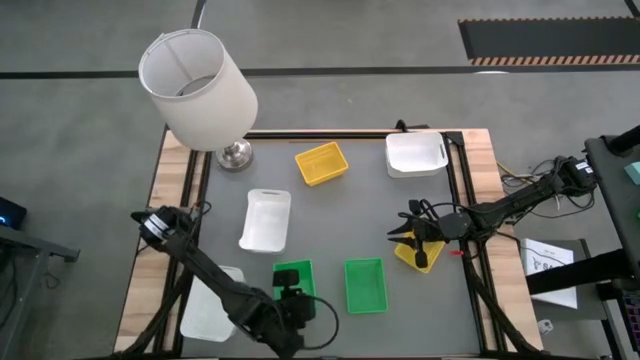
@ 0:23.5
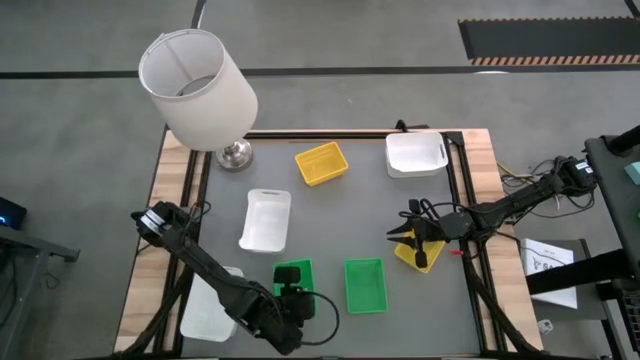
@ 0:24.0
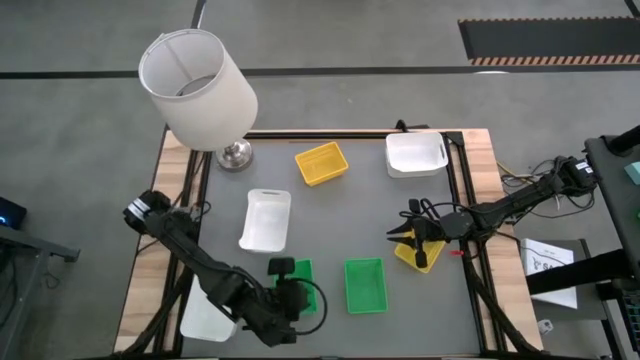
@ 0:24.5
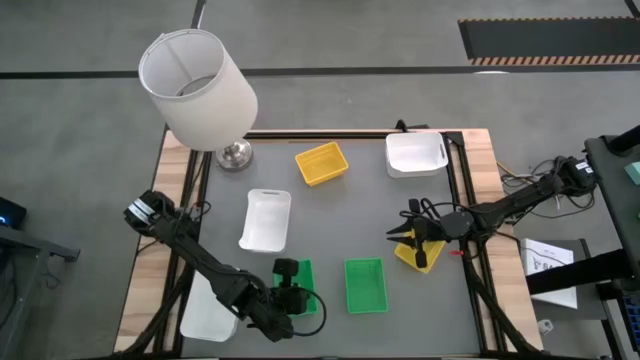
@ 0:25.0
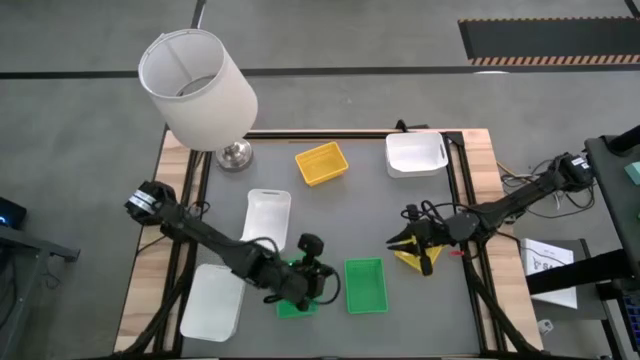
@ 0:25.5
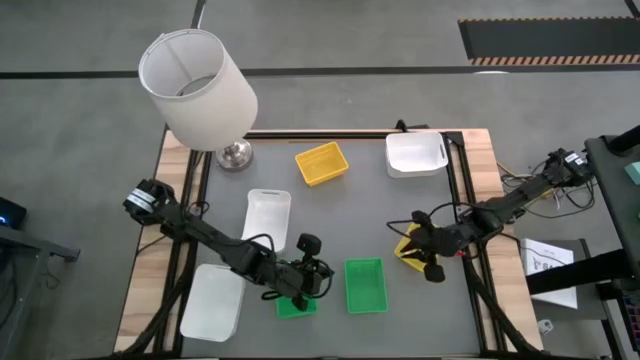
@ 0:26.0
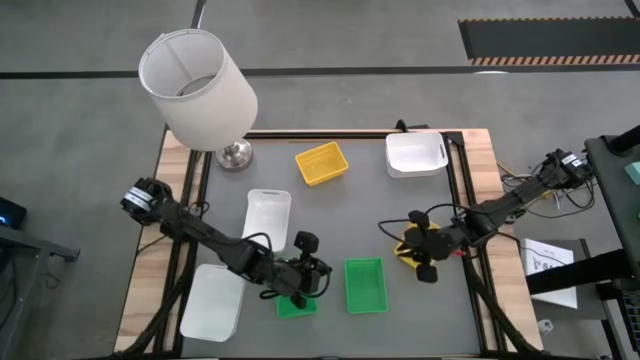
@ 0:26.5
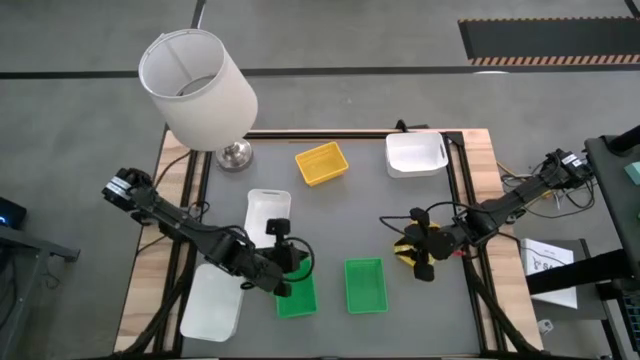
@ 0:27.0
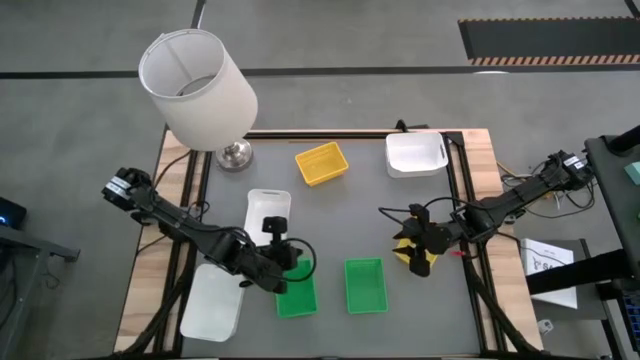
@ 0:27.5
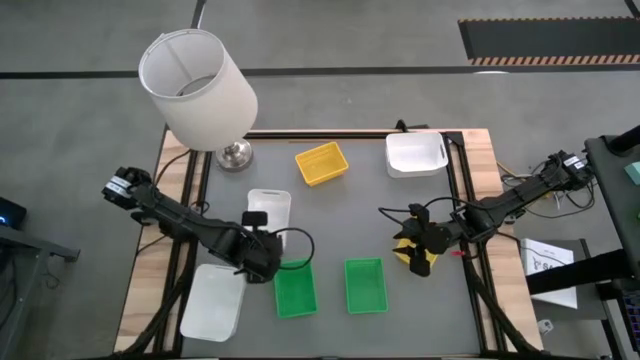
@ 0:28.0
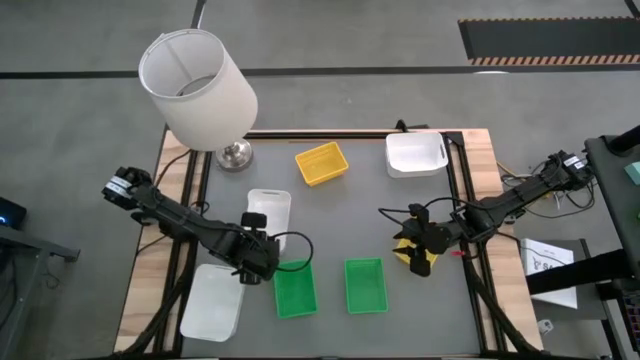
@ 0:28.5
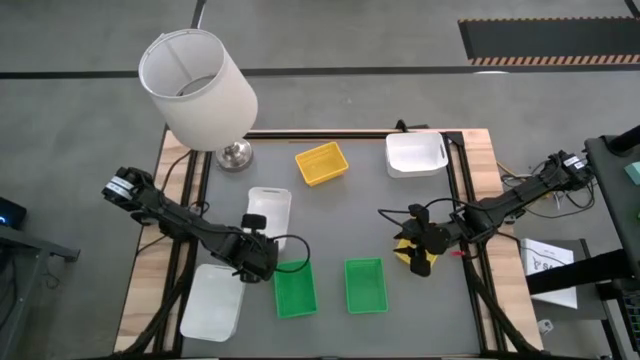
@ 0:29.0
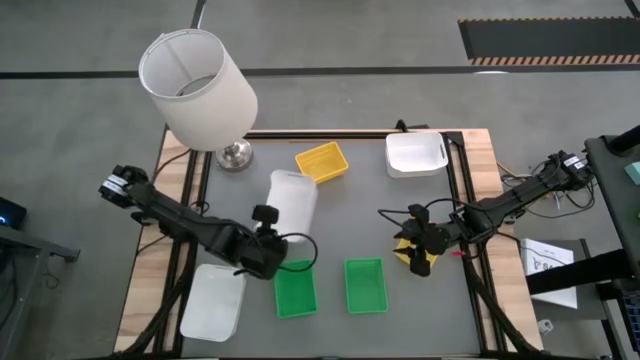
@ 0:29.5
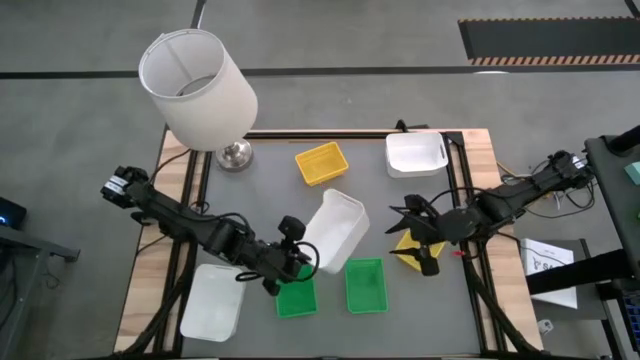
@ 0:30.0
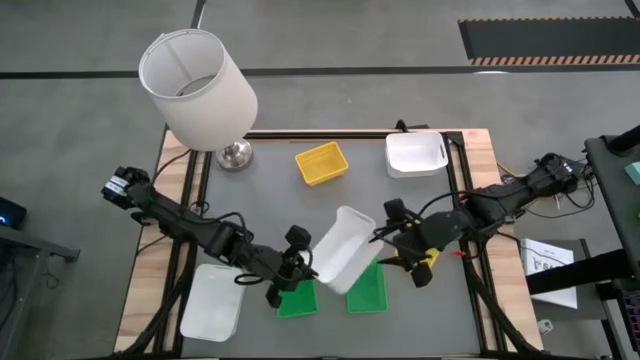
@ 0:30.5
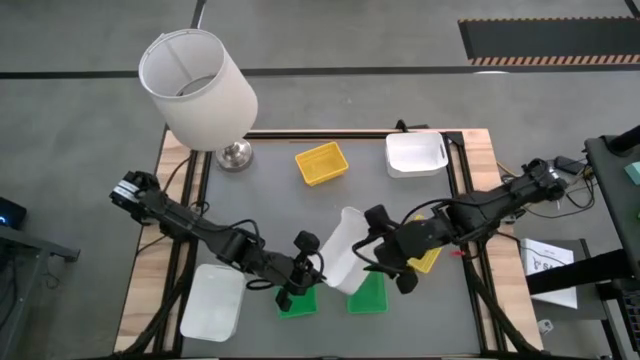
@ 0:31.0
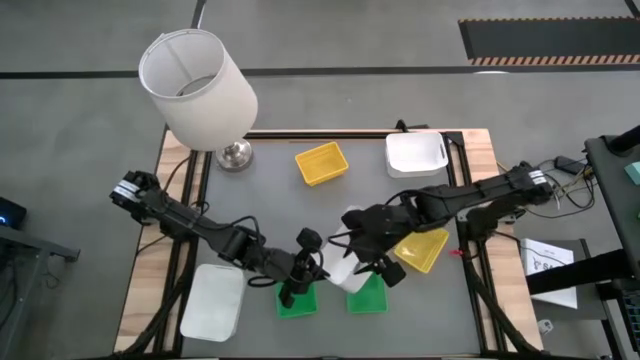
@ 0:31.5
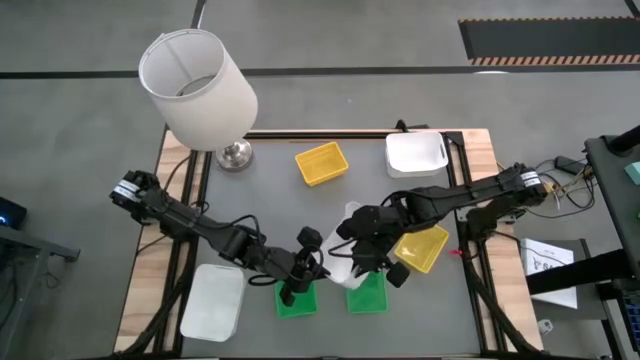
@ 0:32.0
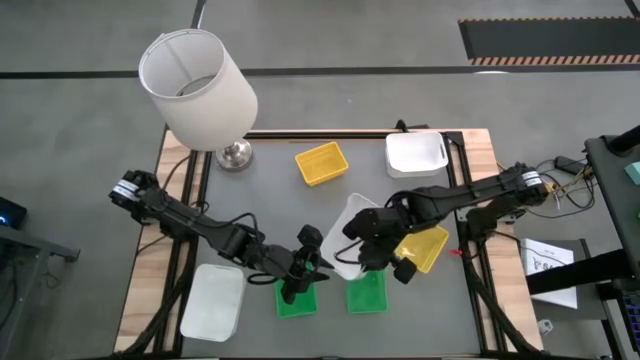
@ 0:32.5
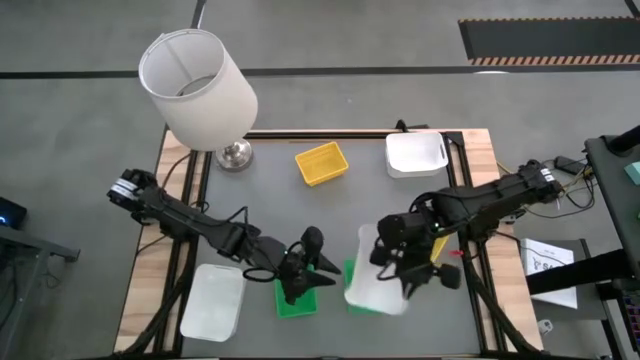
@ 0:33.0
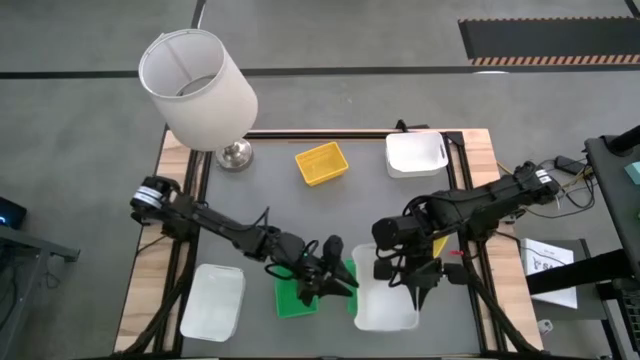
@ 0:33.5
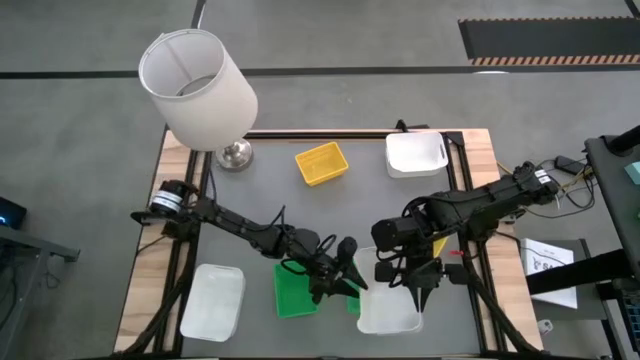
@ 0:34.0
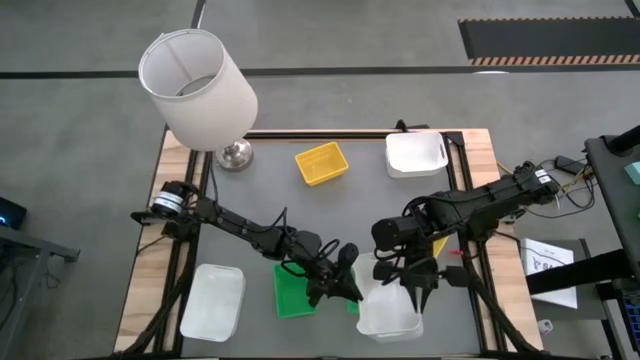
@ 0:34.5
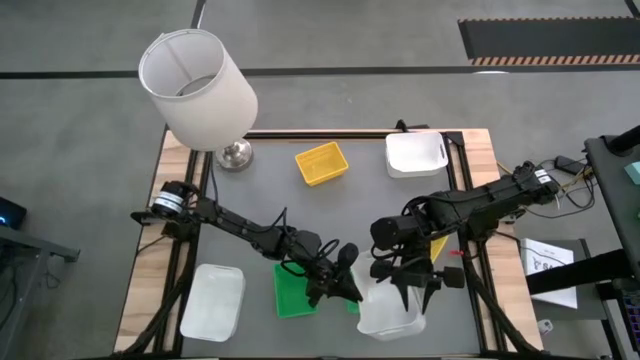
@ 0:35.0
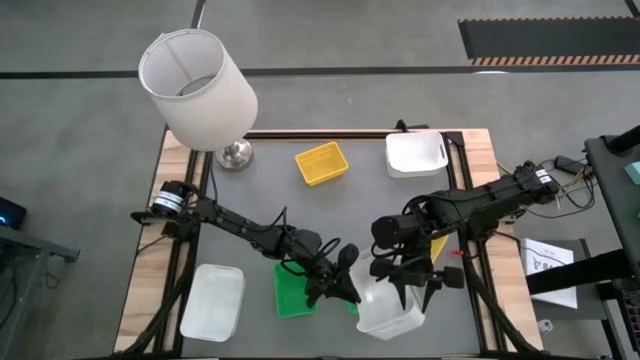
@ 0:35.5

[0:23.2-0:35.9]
Stack the middle white bin on the top white bin
